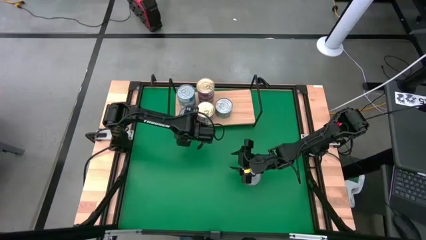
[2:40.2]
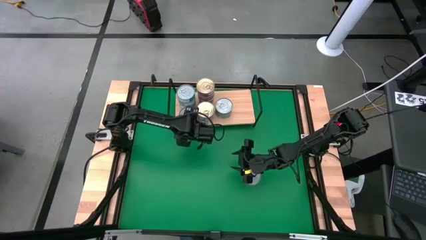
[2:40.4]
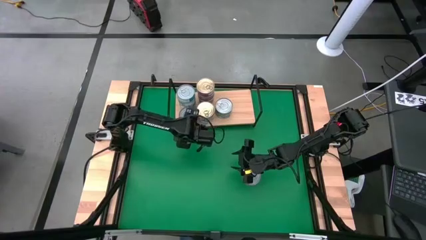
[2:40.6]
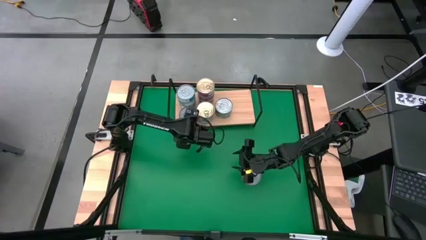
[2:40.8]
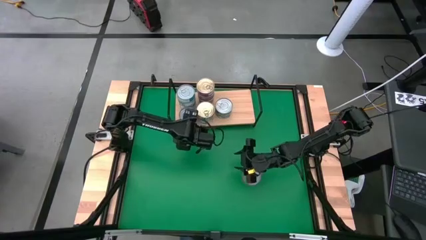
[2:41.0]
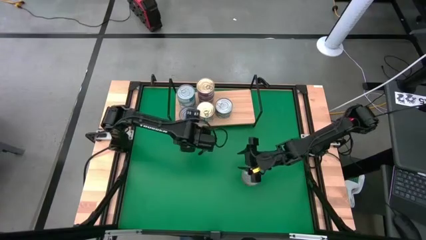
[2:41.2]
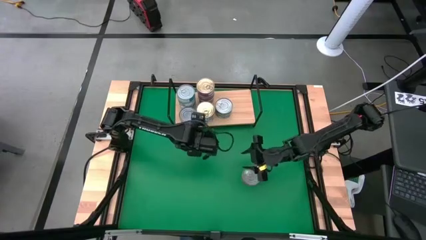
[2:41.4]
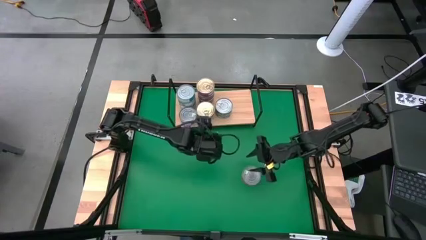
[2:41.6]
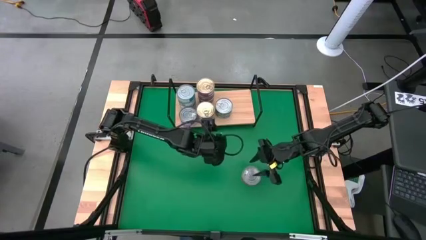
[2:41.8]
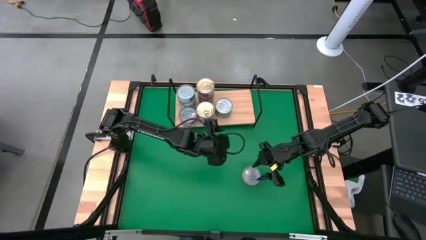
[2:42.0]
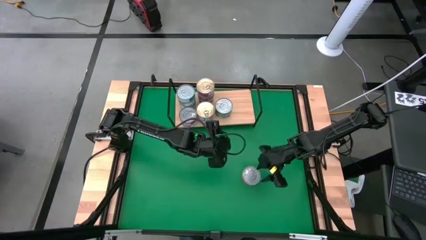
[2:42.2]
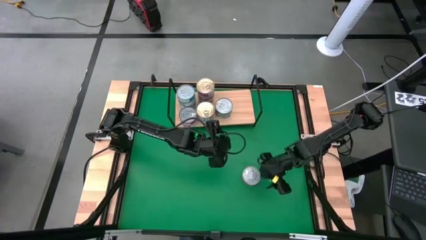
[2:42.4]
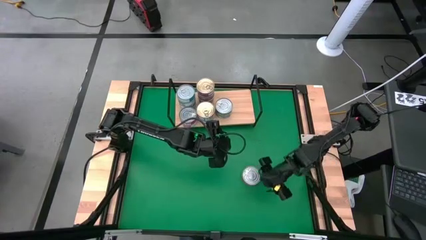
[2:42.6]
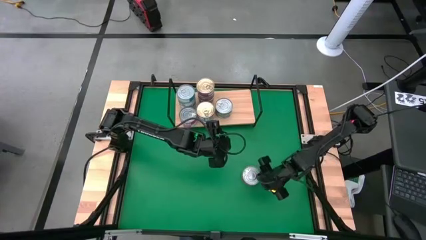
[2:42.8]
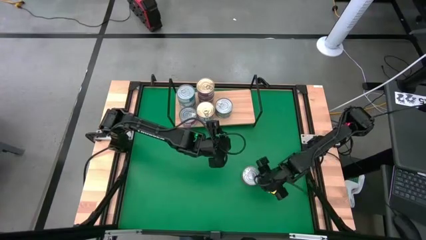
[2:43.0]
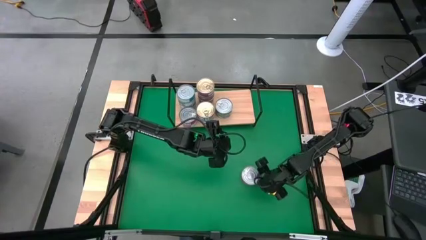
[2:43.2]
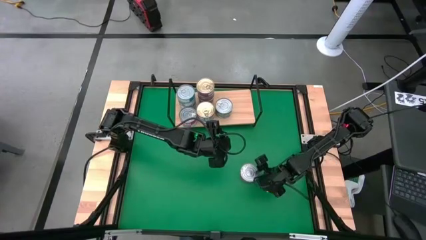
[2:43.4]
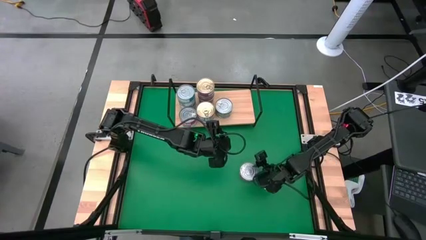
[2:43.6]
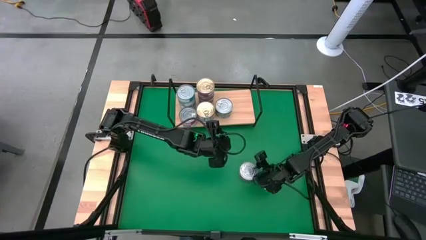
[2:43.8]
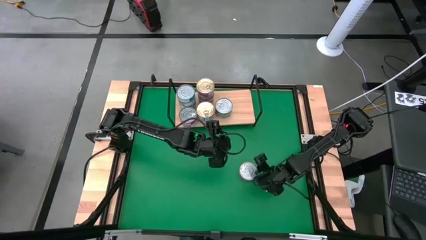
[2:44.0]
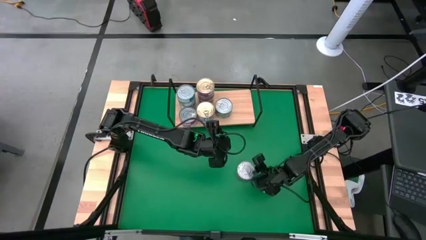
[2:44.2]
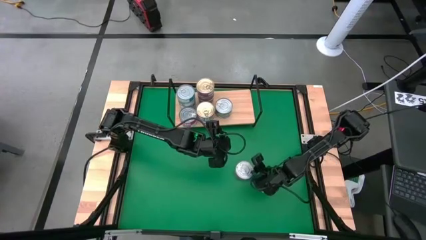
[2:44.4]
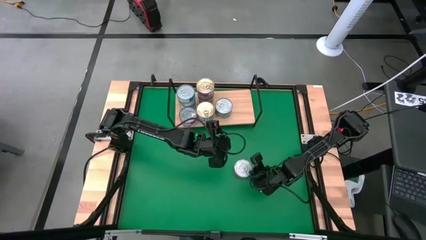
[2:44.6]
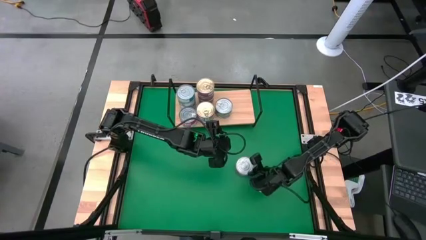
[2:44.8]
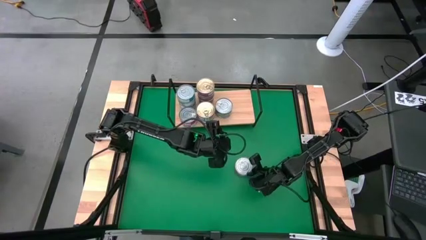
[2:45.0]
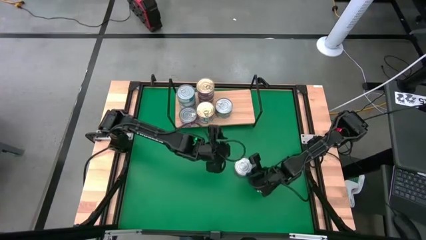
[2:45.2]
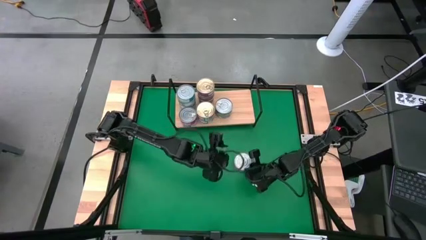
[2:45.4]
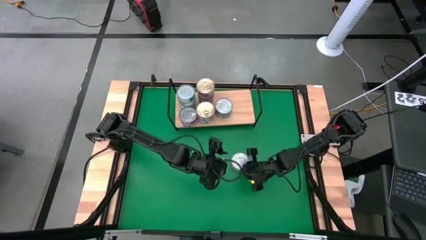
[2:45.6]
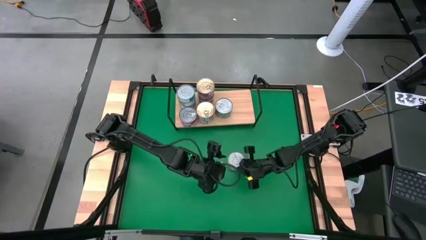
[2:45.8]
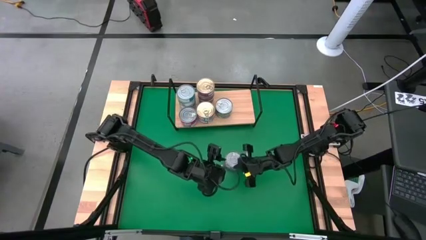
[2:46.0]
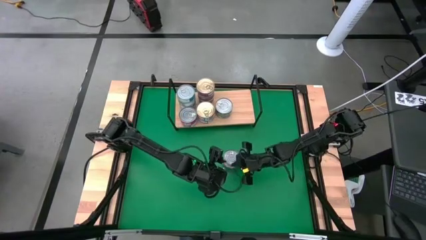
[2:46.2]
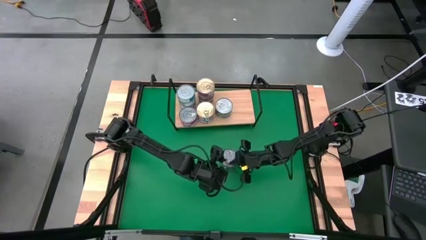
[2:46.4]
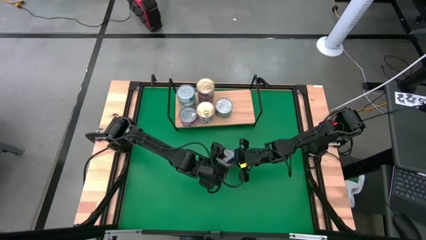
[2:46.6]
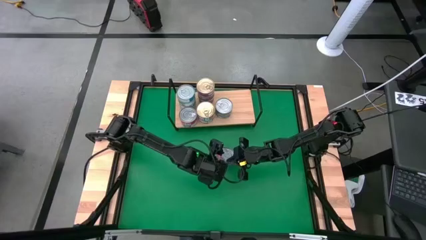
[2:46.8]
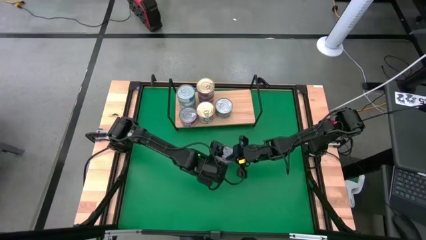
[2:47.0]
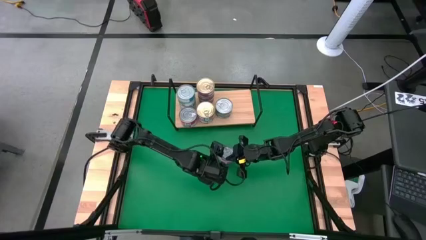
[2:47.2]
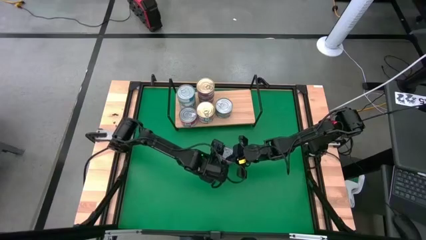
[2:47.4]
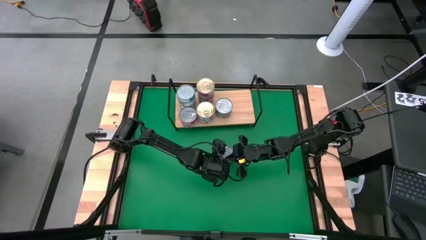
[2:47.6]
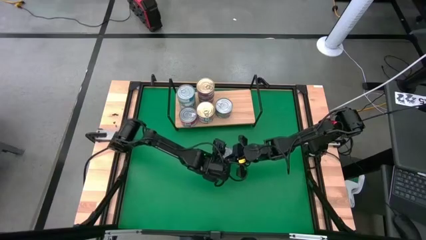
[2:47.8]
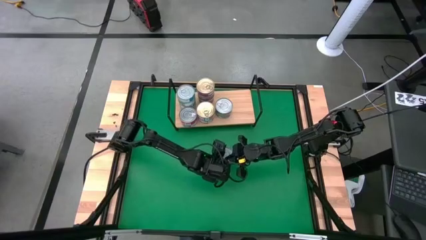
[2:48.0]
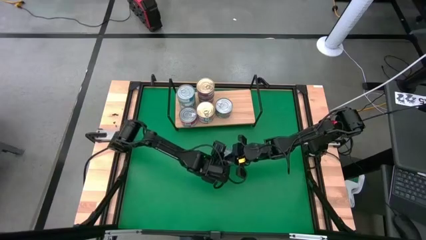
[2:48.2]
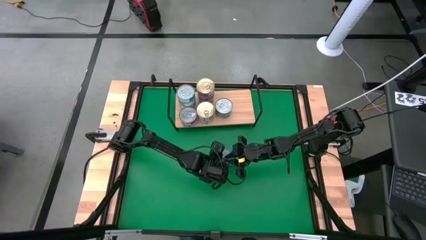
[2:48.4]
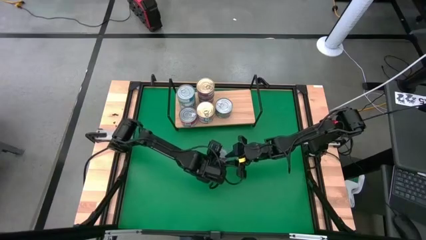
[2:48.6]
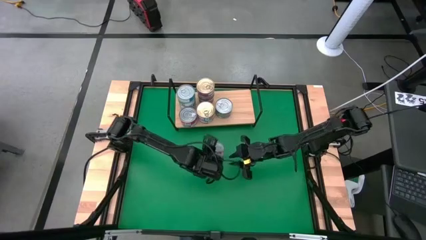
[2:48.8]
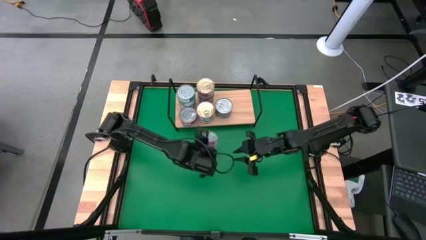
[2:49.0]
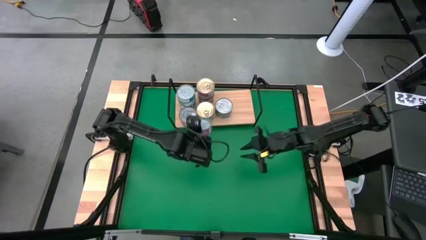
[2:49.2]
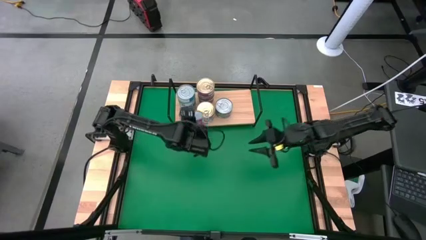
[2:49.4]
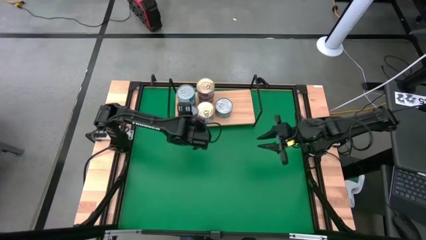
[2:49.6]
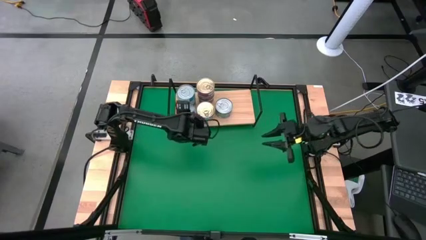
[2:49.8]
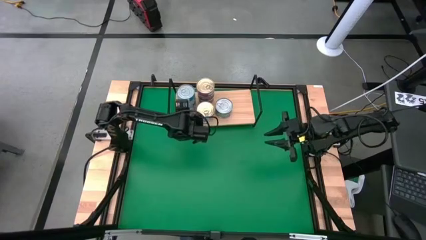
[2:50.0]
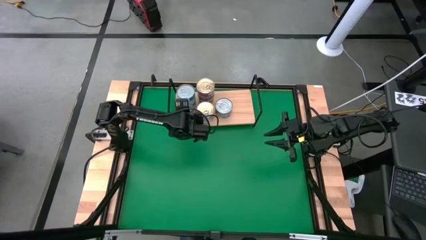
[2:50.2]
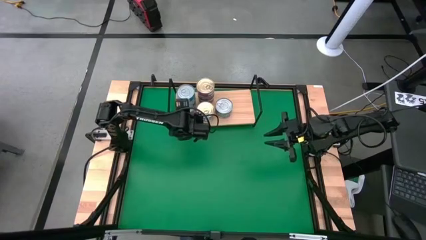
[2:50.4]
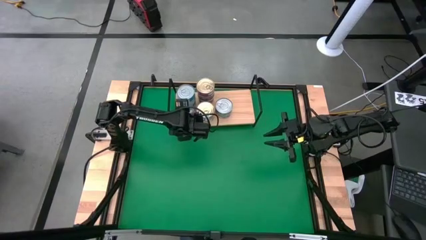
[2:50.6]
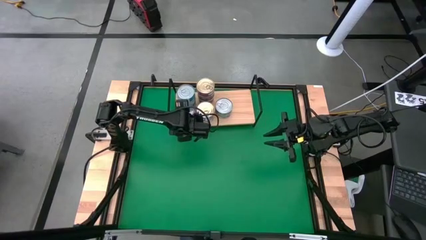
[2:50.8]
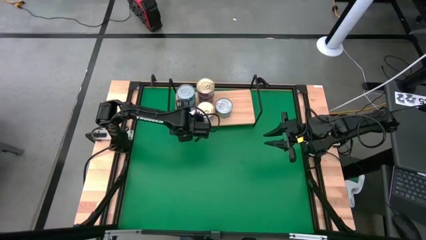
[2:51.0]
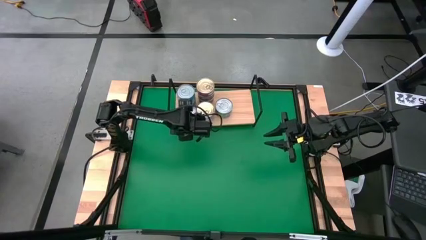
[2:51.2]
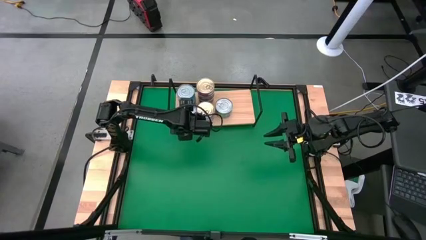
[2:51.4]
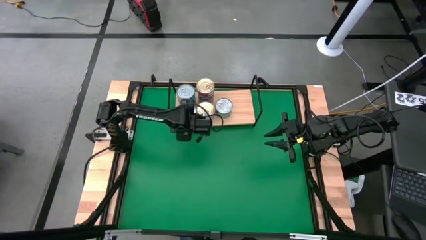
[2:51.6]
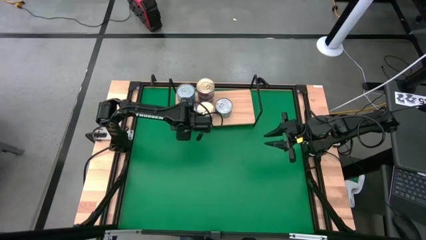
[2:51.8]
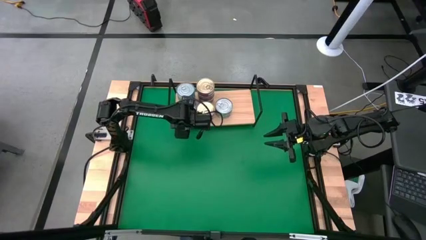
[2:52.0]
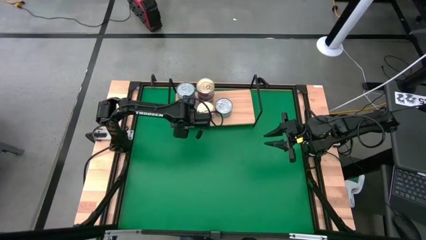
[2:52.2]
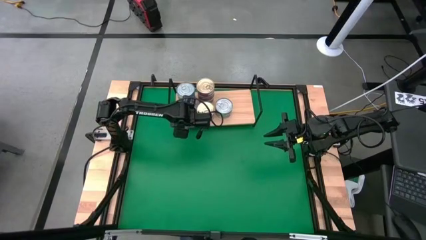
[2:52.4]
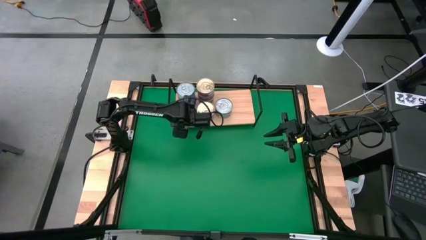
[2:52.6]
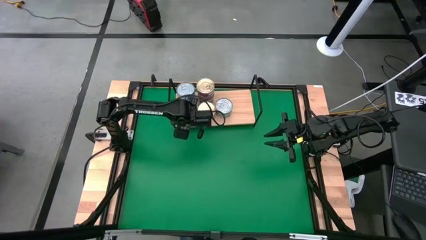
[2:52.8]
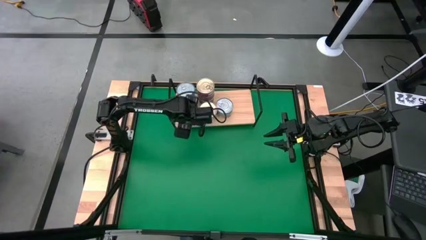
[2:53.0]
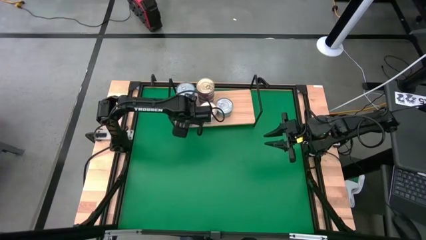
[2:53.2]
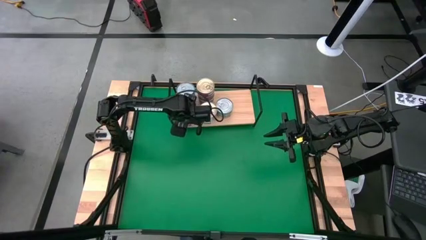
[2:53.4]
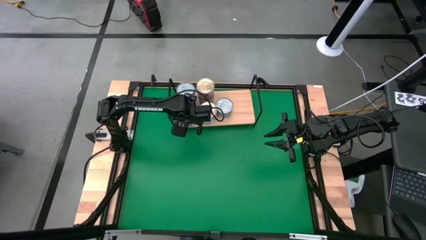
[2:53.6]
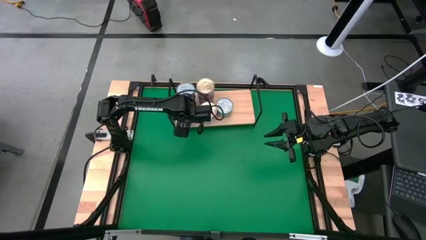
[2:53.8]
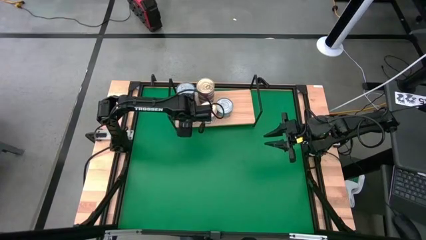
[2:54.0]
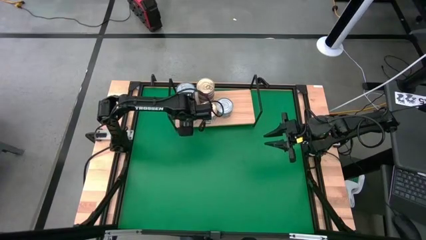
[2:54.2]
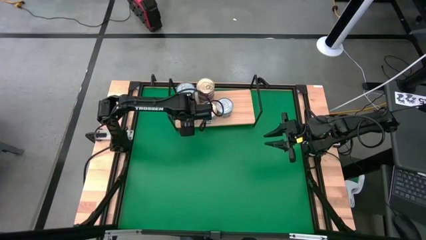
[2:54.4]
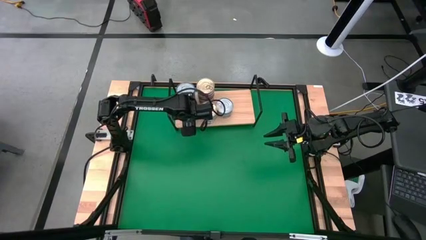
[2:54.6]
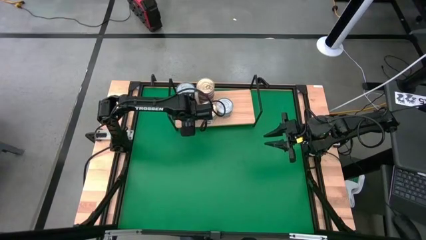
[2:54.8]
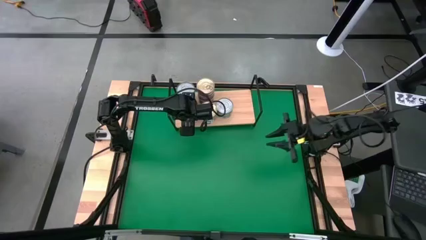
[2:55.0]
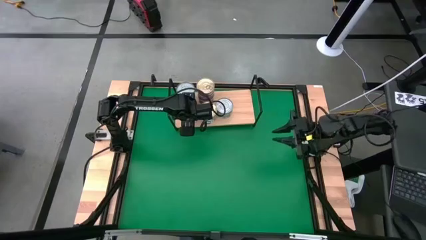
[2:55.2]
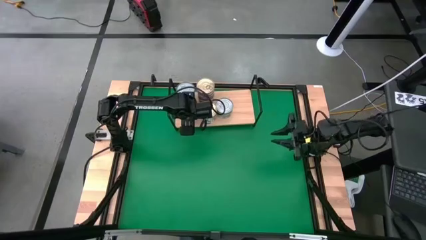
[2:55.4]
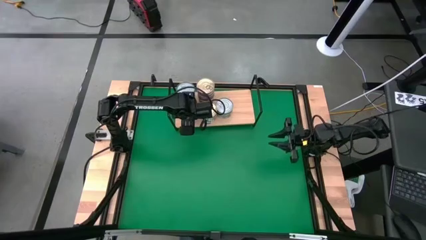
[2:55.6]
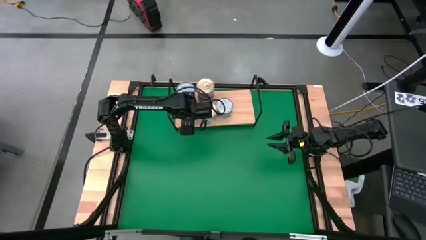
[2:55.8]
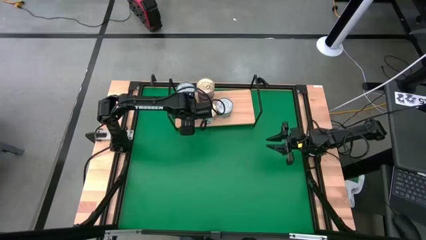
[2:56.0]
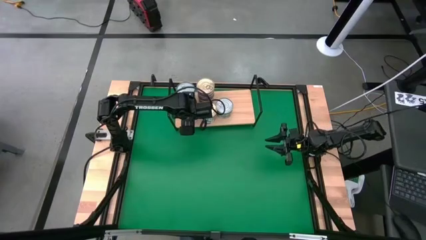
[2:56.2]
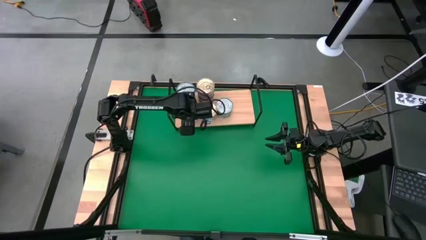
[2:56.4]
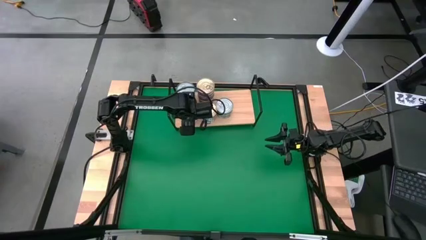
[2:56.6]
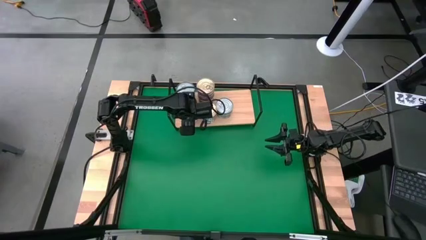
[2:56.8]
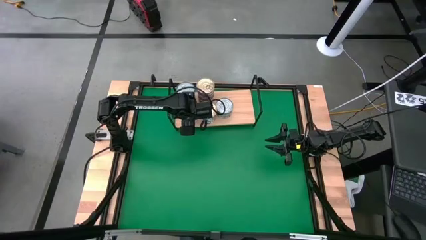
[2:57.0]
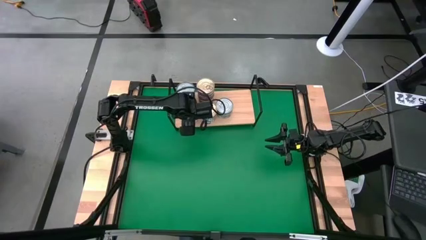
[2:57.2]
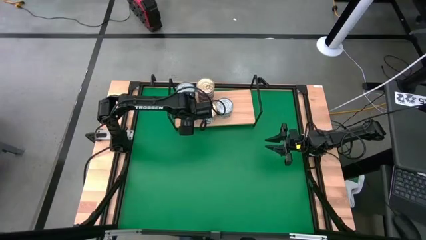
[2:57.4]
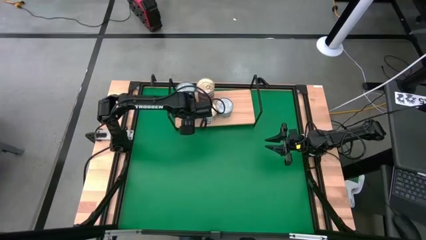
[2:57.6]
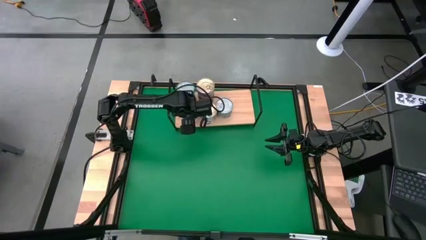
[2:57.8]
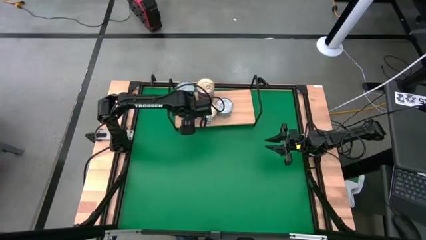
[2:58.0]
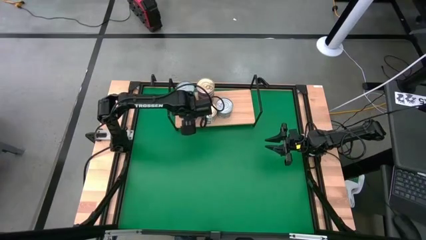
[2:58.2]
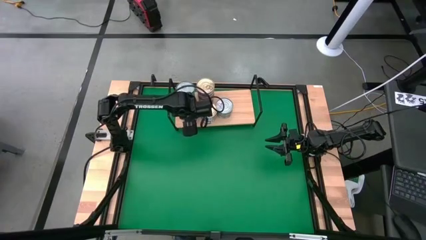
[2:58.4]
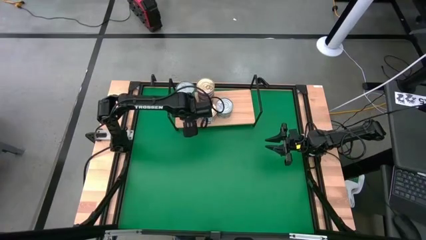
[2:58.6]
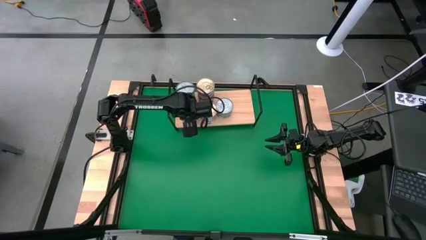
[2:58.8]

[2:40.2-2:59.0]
Task: Stack canned seafood by type on shelf
Stack the red tuna can on top of the other red tuna can on the shelf
